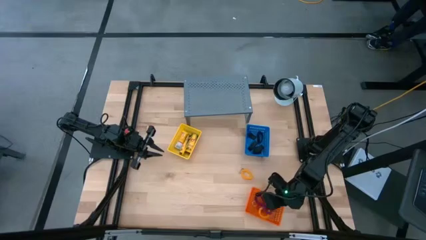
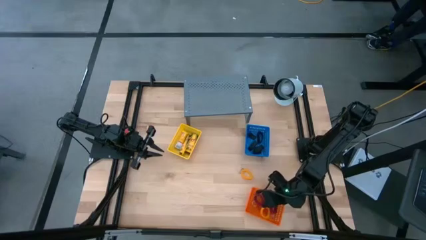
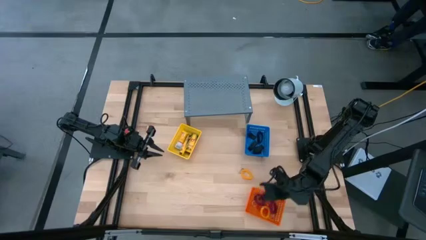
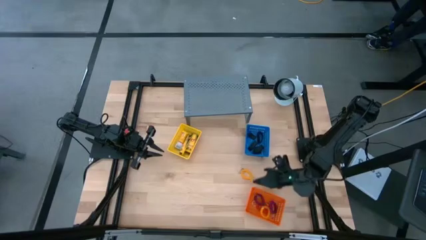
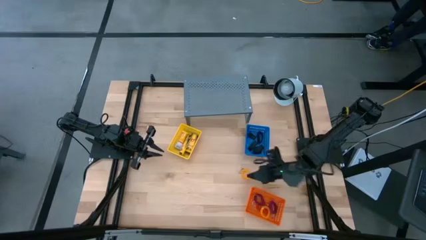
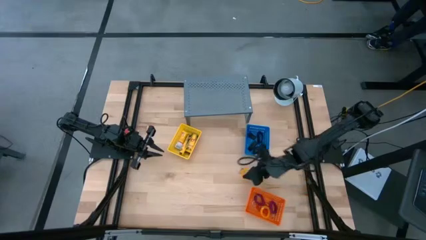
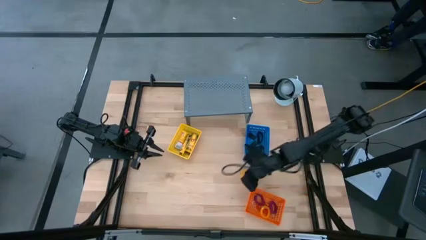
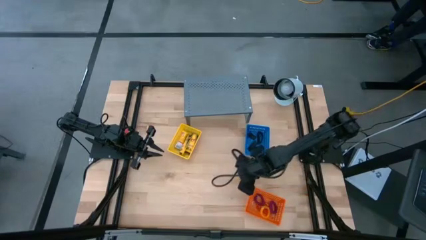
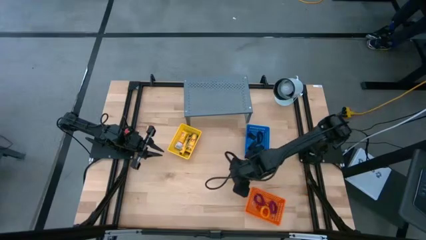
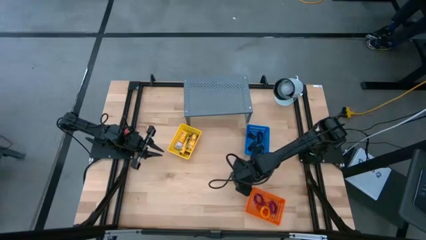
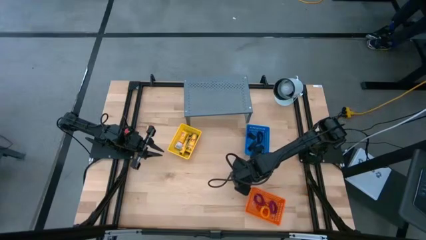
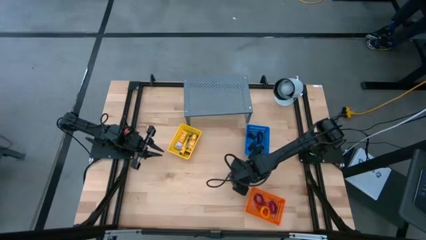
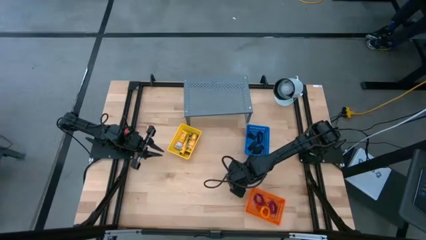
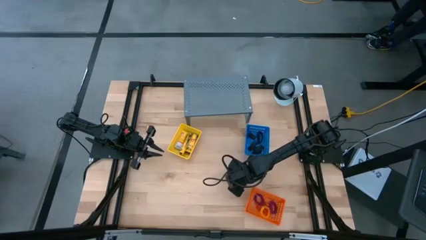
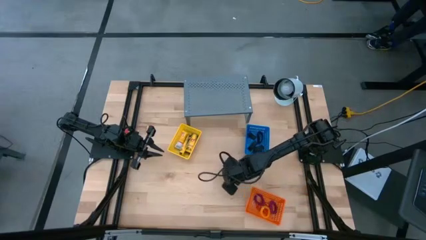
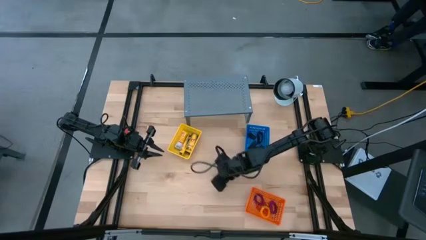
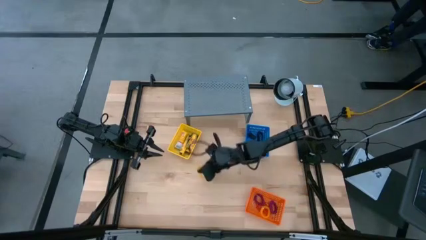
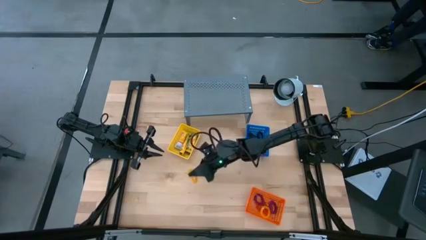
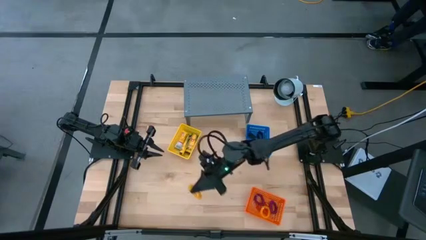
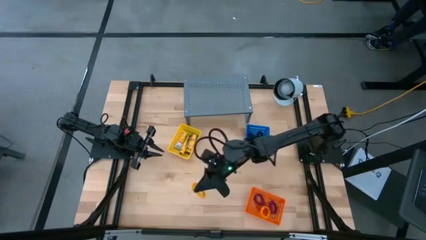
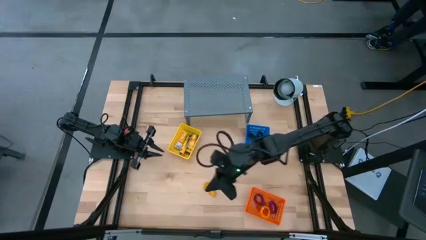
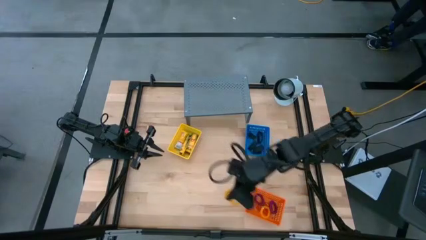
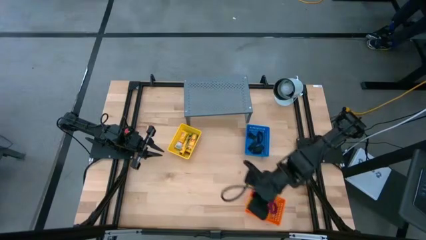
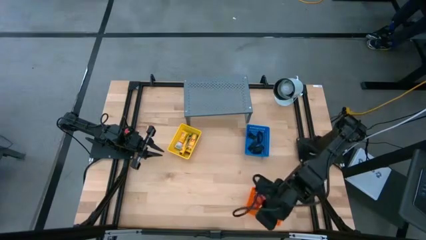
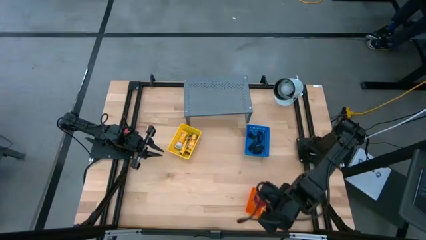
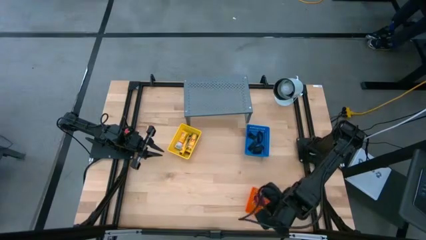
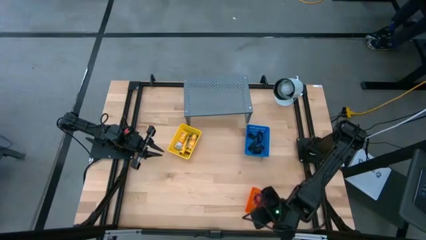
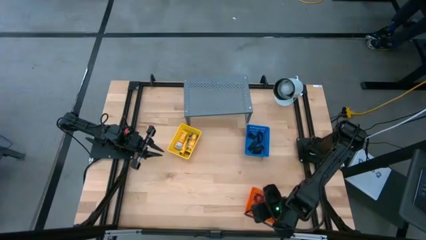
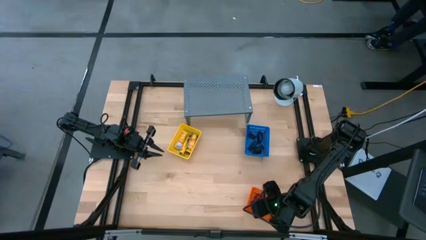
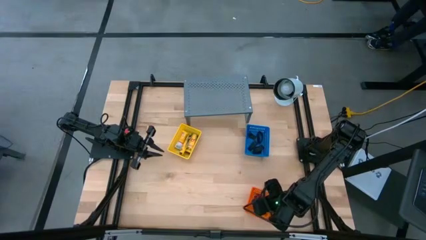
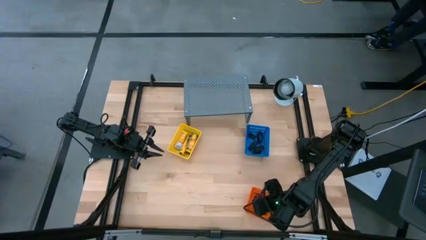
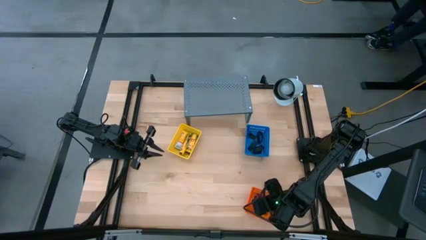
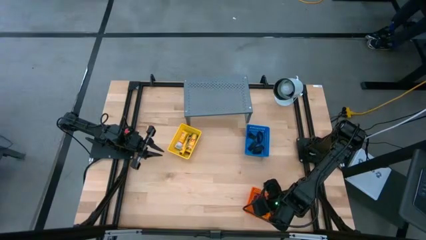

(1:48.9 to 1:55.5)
Task: Pick & Place Office Desk Supplies
Put the yellow spring keychain into the orange bin

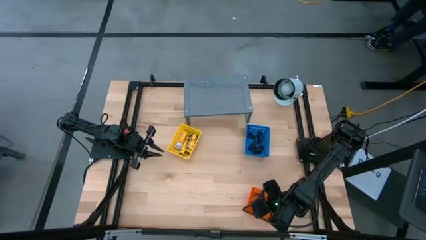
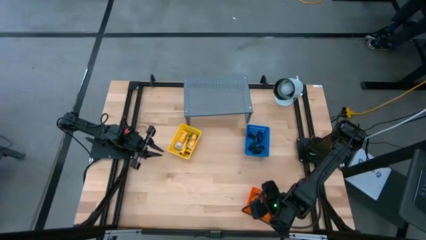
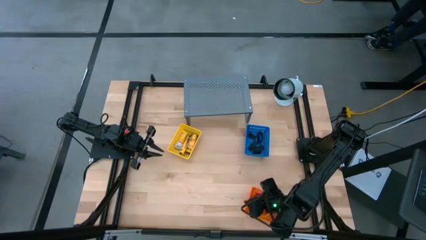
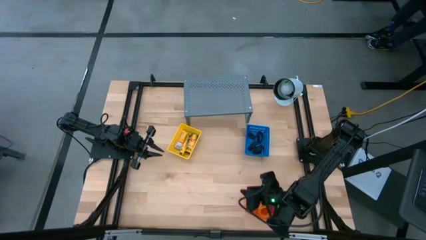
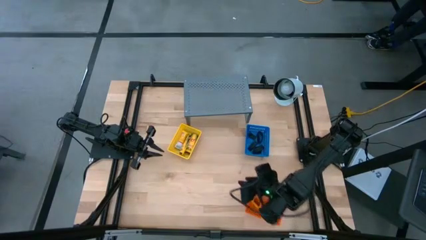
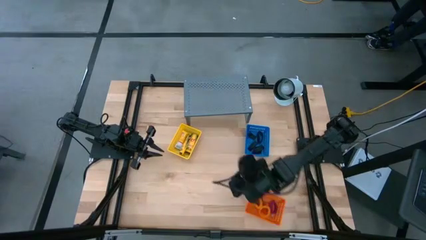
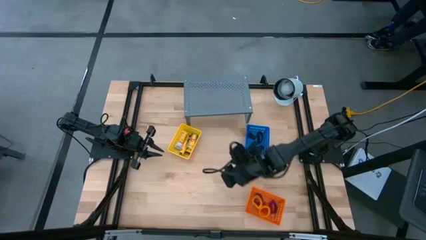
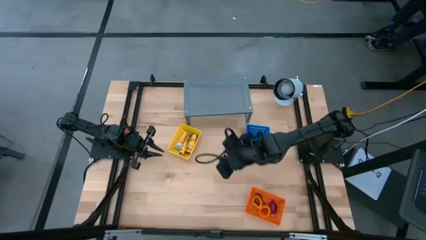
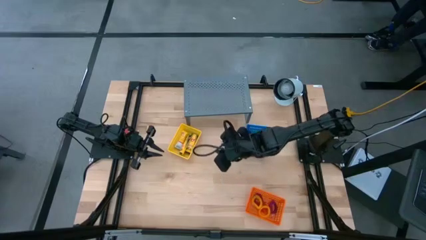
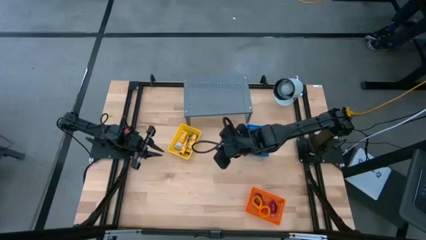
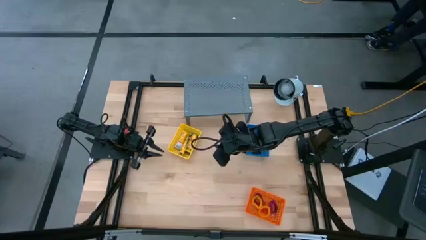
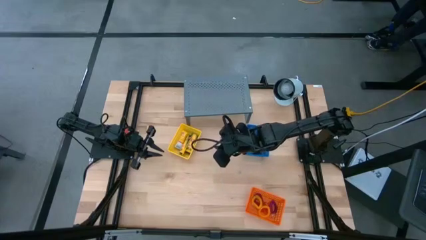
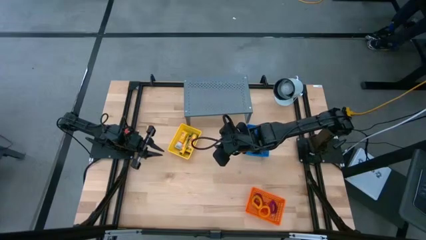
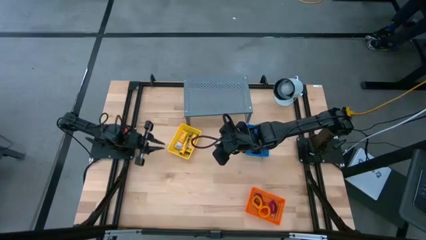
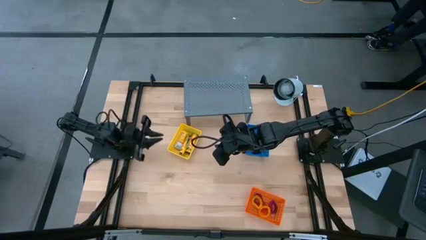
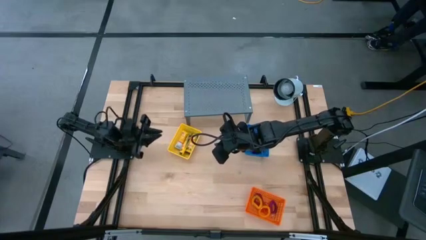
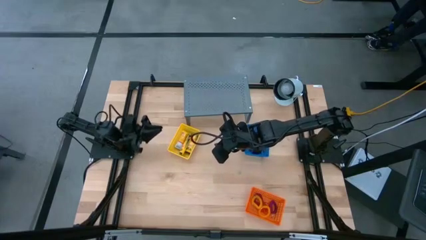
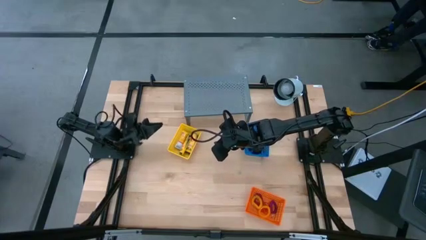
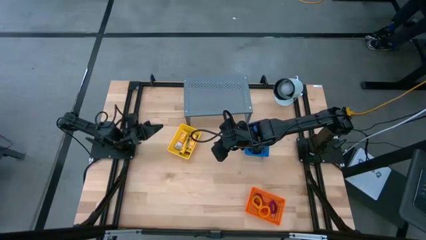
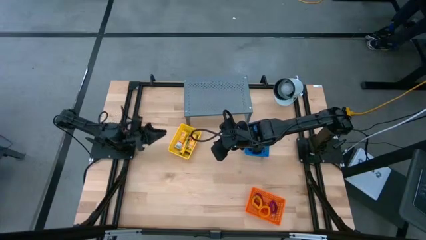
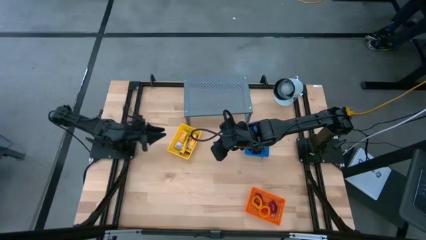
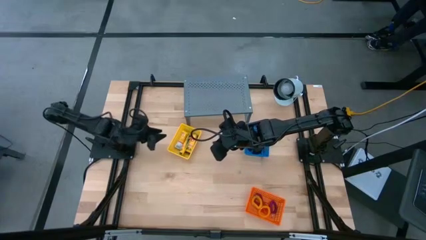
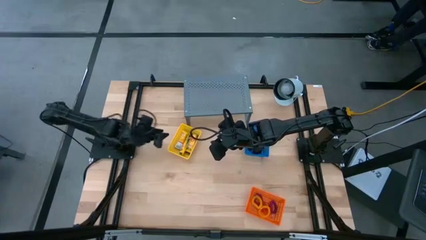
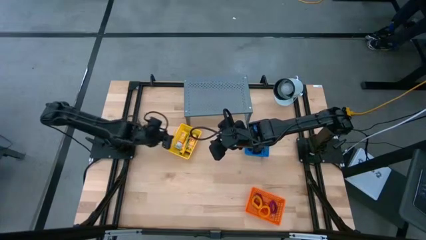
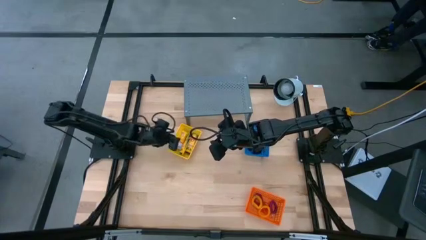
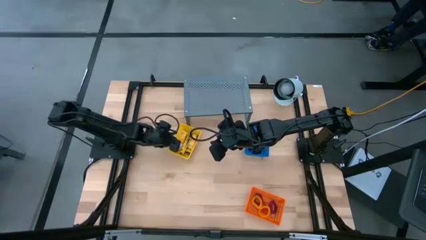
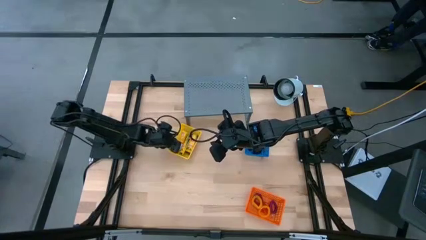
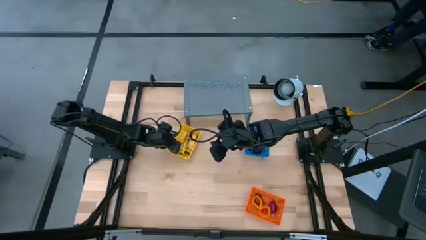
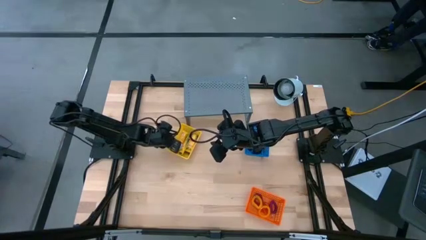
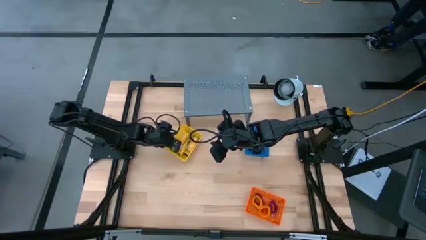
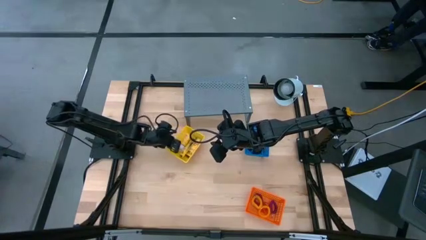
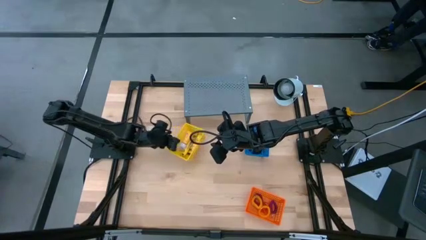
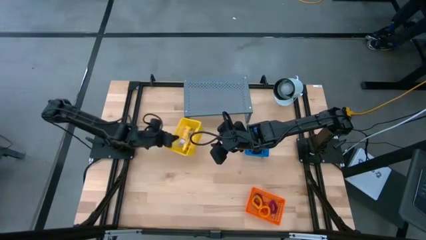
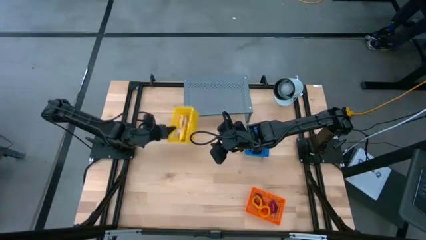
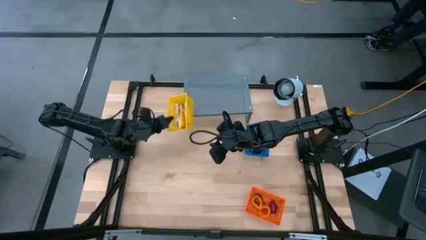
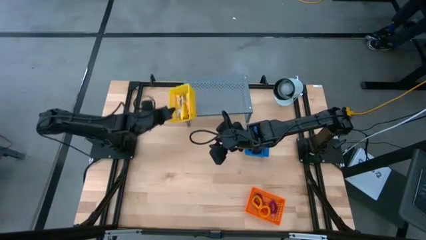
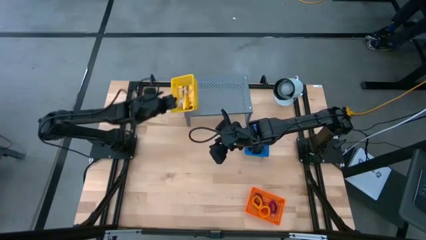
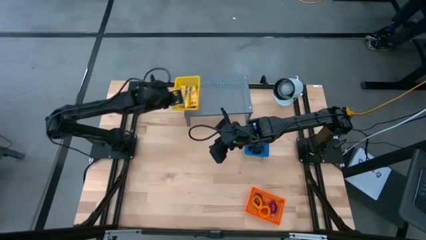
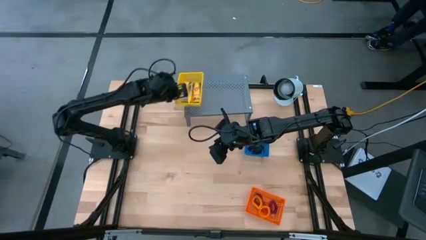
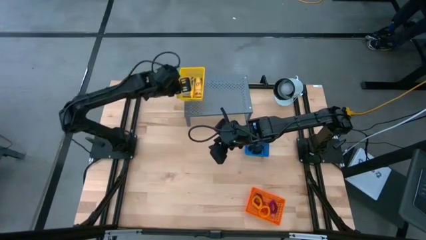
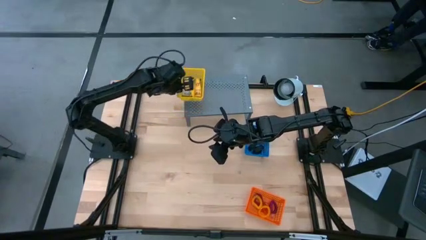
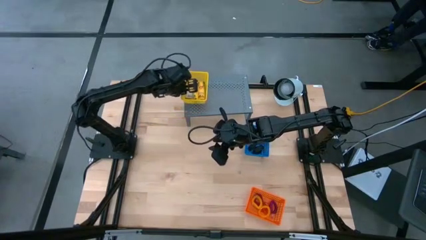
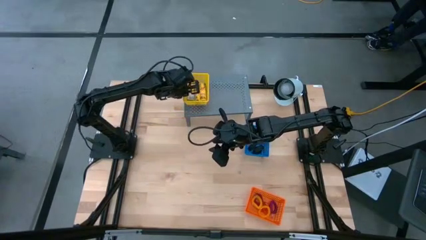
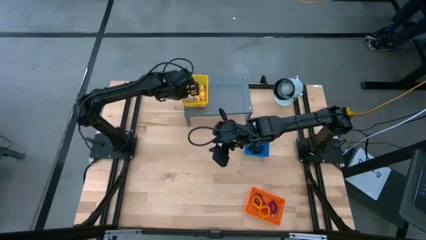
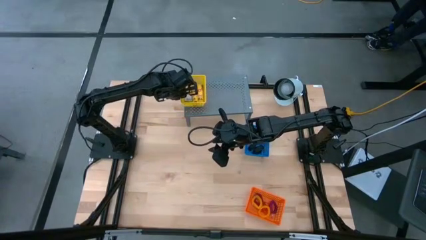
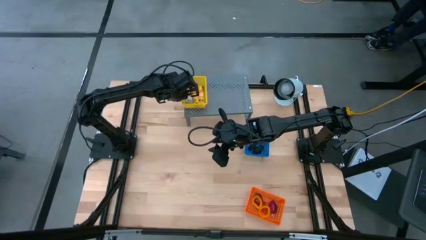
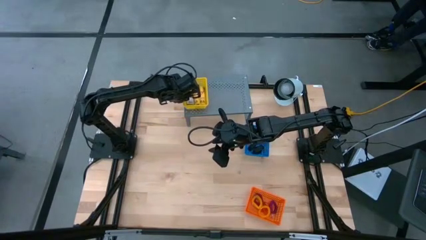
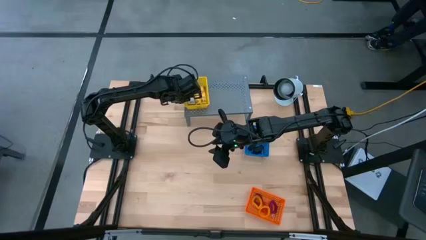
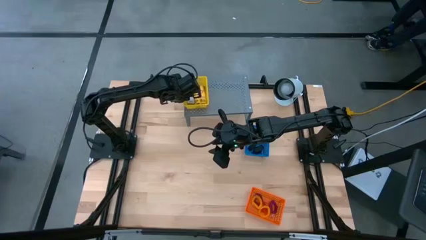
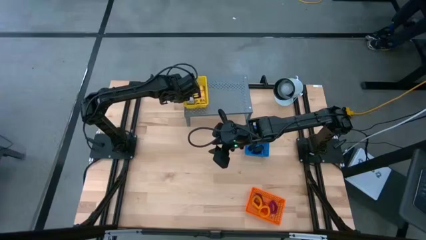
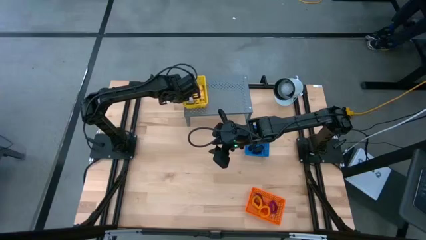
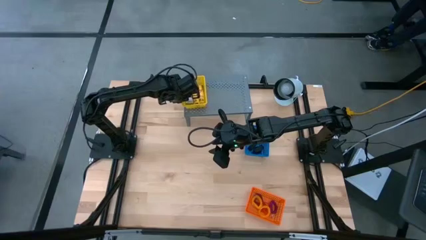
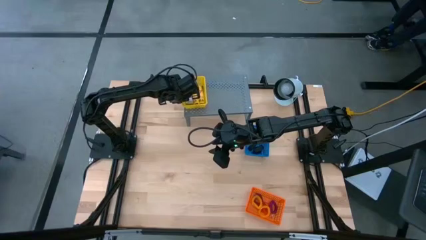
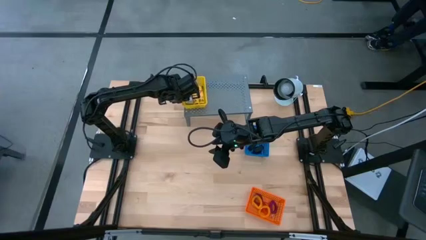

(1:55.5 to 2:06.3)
Put the yellow bin with the box of crayons on the shelf
